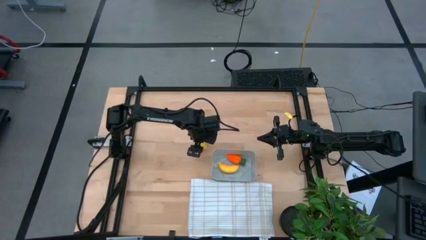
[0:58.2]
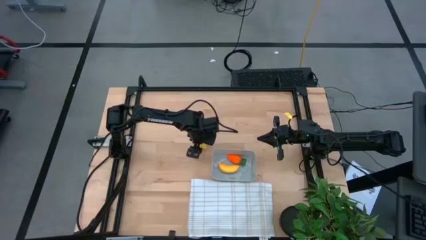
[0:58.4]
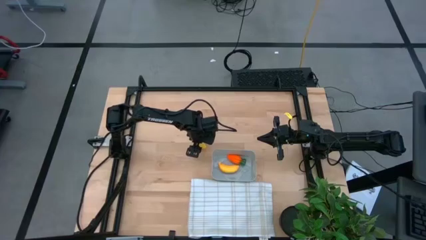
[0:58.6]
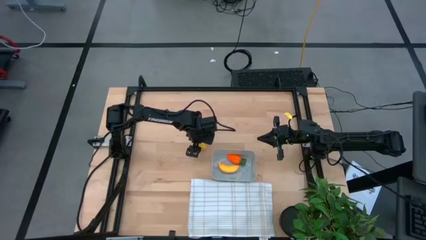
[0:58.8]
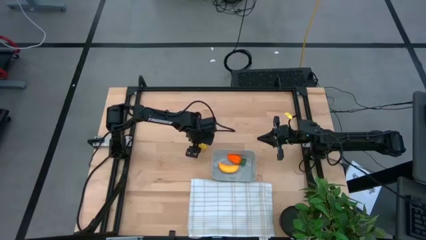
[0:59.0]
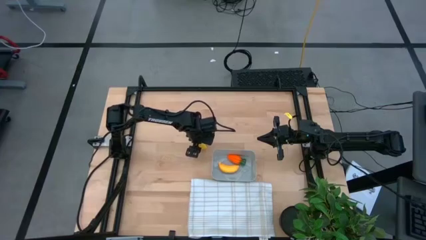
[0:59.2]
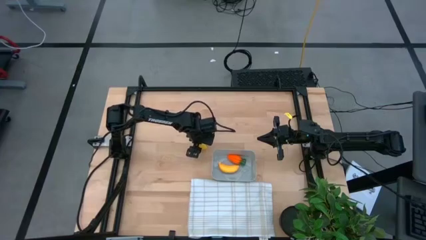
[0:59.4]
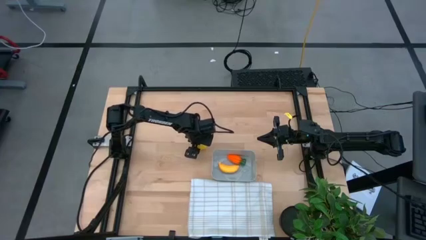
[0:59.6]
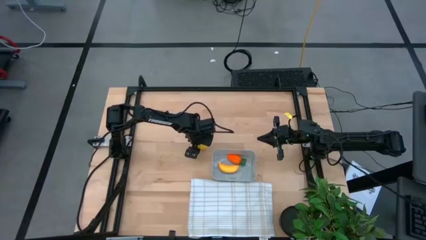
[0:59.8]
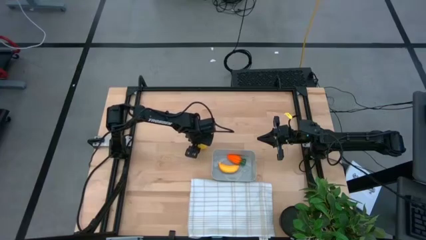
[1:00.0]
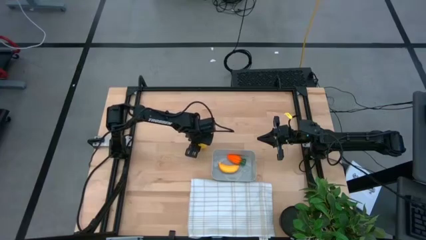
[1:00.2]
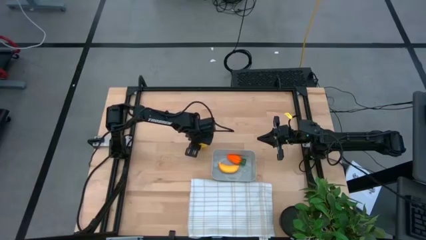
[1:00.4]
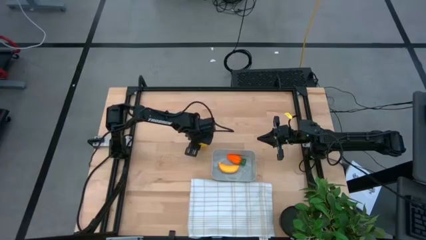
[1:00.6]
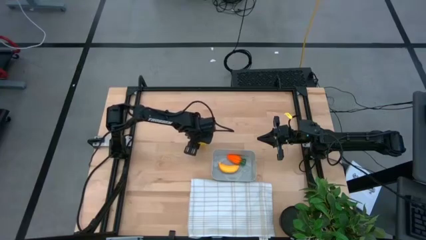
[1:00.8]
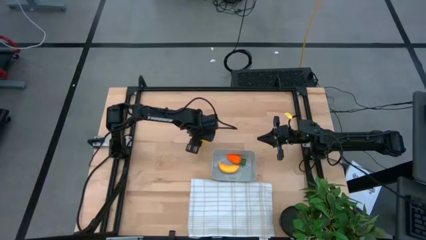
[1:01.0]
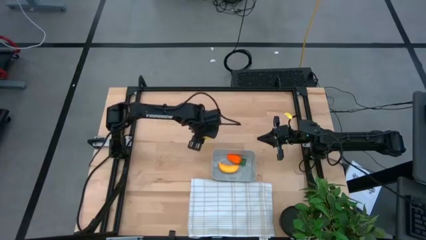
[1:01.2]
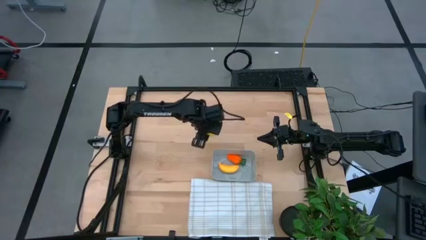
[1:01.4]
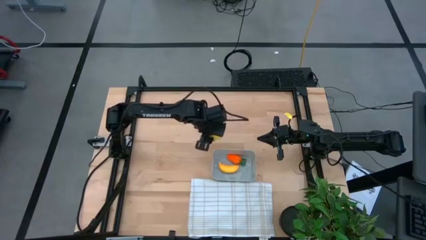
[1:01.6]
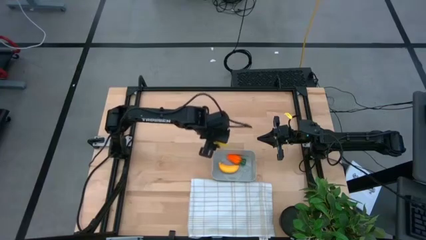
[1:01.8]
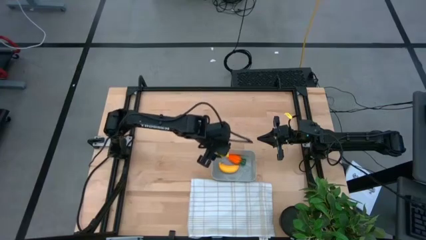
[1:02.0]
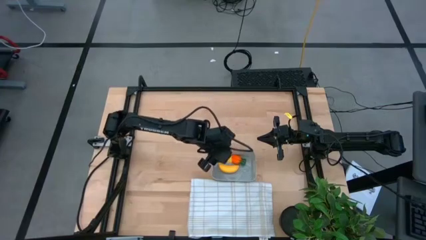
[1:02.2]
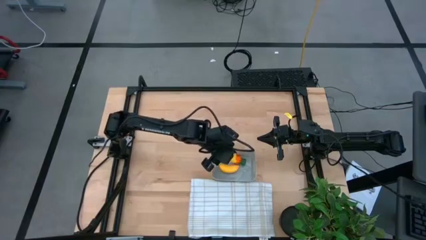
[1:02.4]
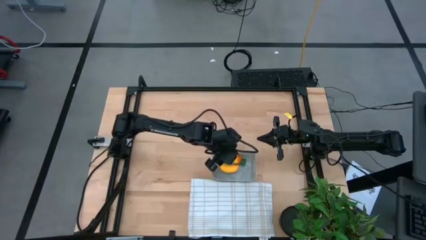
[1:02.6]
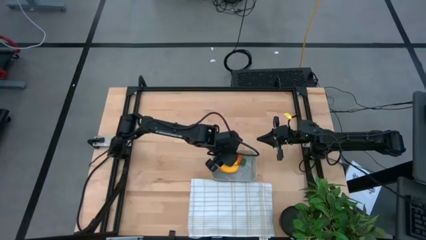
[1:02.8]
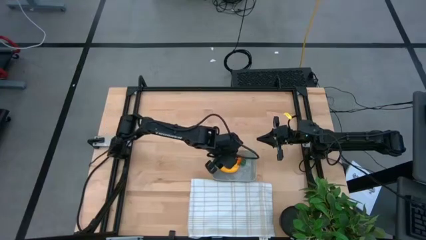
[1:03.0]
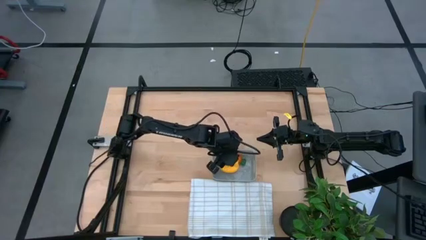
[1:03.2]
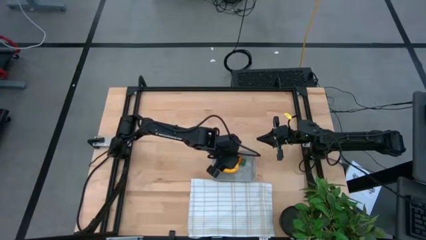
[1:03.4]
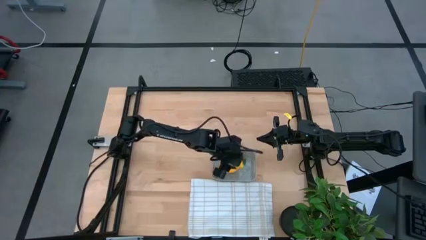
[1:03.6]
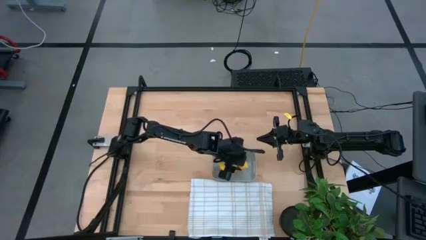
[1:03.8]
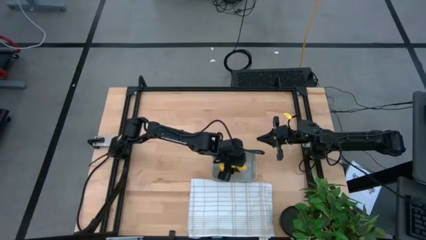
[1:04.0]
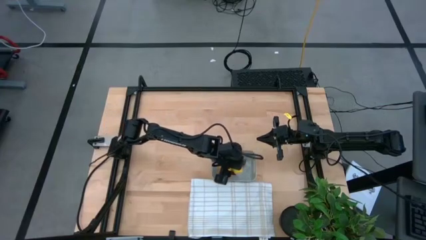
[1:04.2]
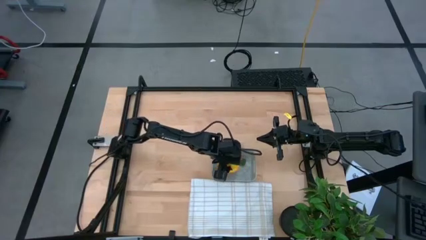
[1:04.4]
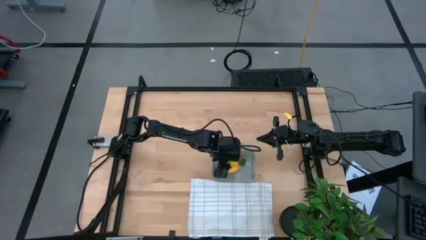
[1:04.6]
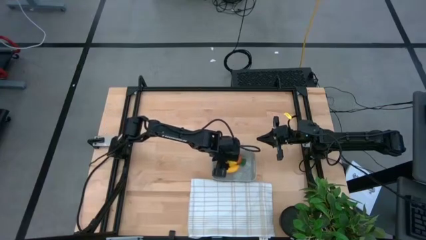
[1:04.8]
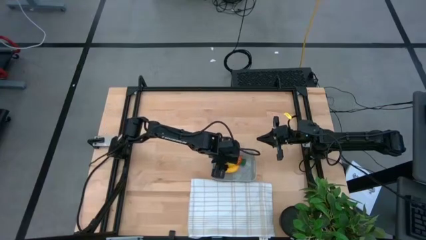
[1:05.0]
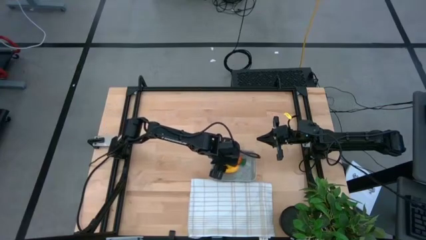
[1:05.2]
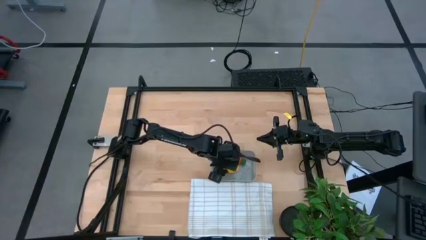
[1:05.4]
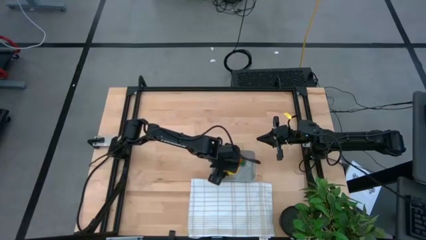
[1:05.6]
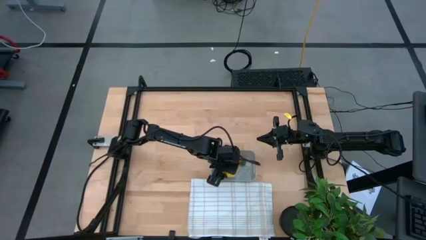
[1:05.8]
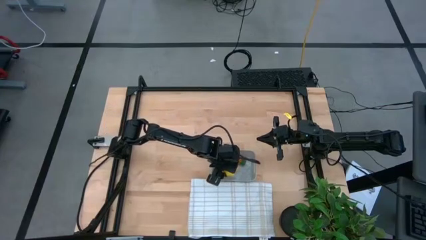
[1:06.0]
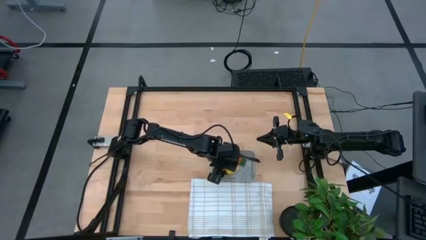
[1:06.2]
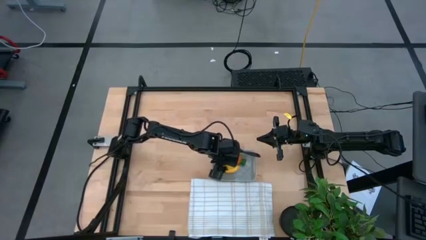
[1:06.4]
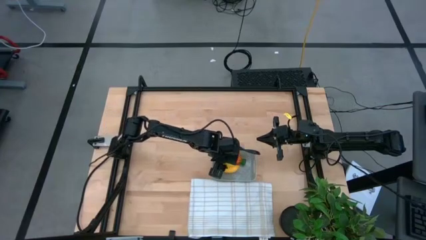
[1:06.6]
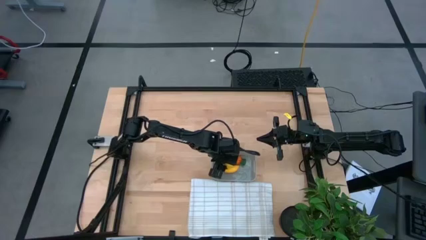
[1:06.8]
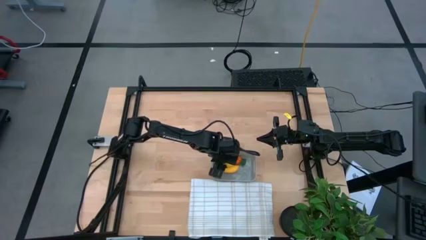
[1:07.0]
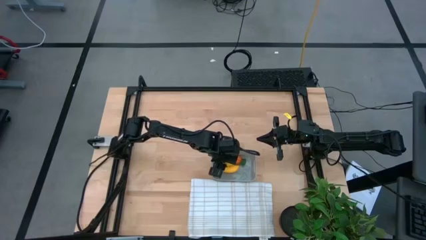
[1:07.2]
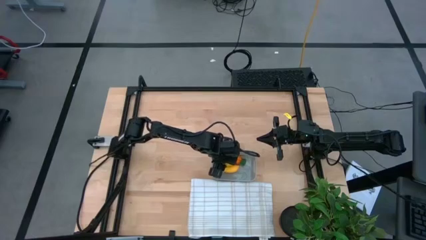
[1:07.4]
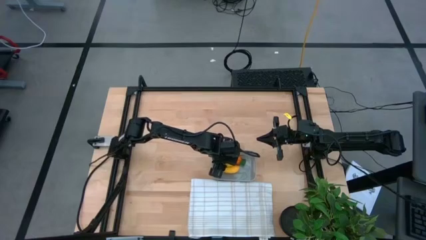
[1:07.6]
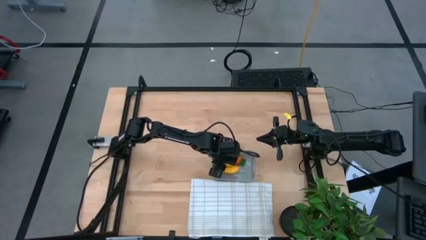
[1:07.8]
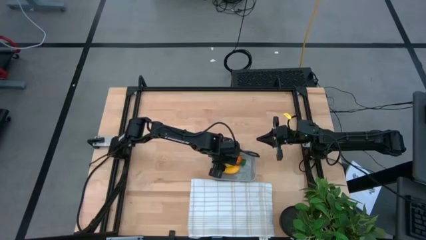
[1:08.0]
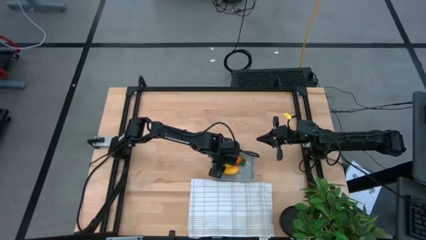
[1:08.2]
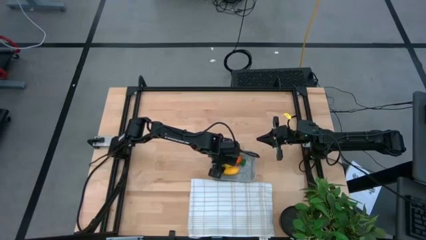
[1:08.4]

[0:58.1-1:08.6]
Task: Pick and placing Produce into tupperware
Put the lemon into the gray bin
